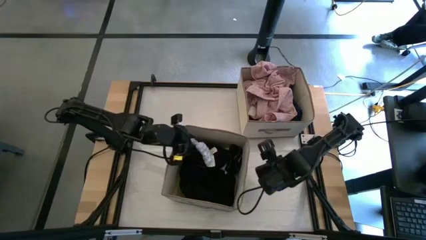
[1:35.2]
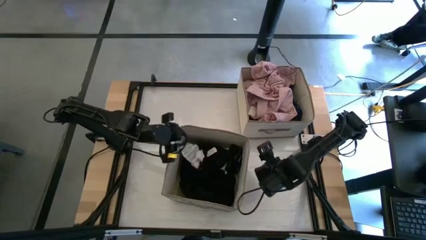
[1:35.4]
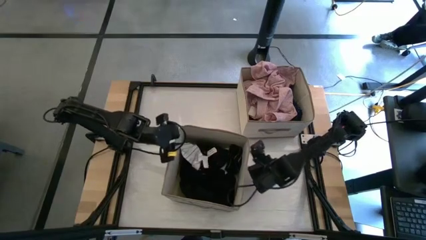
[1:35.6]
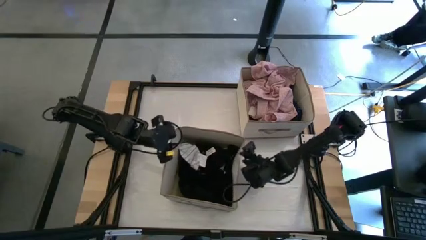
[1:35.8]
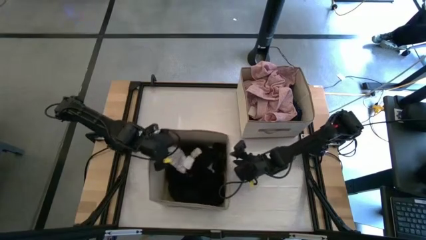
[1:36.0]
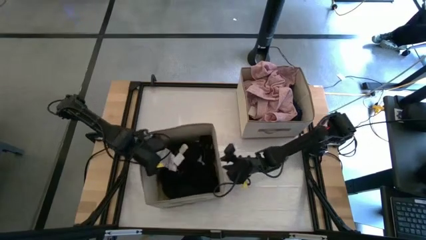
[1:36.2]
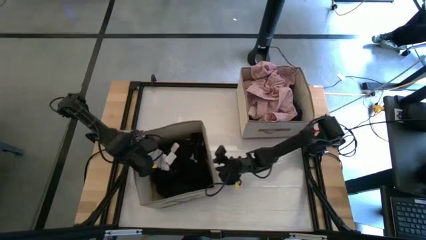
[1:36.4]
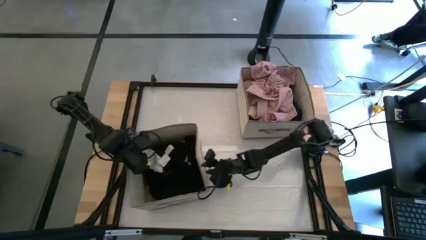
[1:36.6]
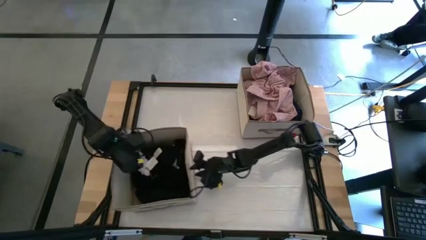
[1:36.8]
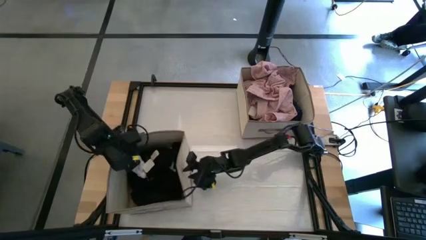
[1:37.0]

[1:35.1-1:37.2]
Task: Sort clothes
Adjust the laundry organizer

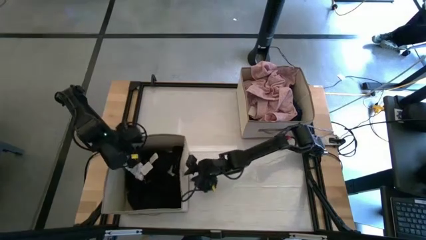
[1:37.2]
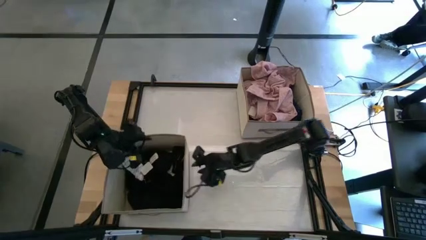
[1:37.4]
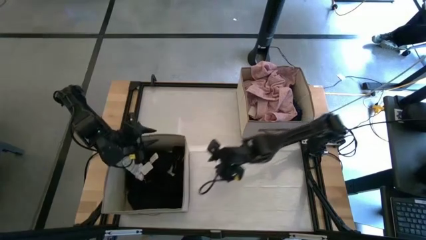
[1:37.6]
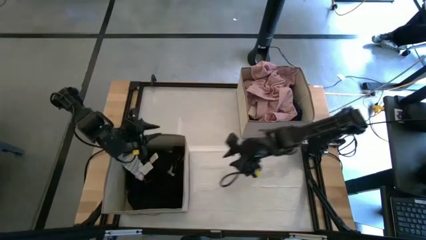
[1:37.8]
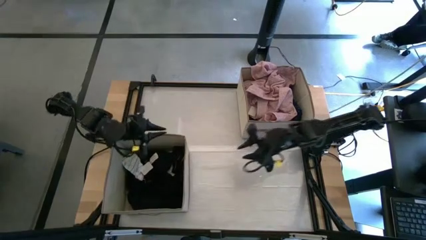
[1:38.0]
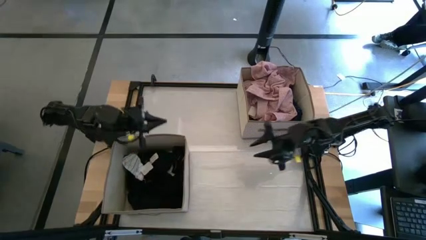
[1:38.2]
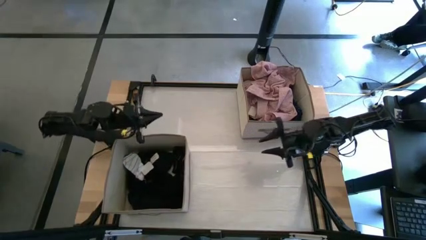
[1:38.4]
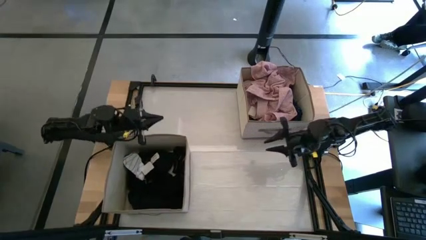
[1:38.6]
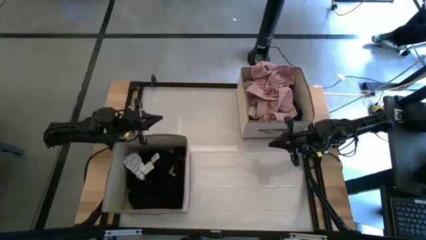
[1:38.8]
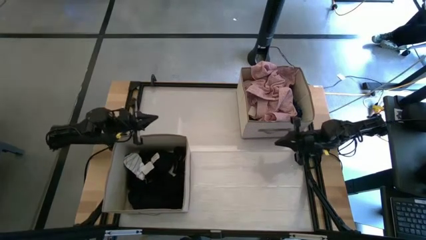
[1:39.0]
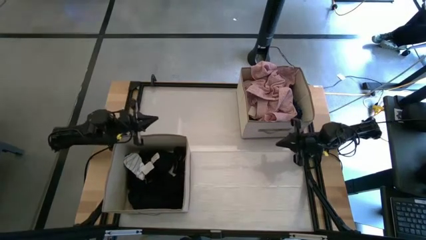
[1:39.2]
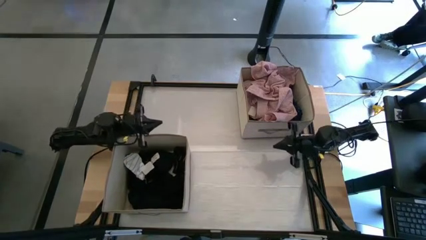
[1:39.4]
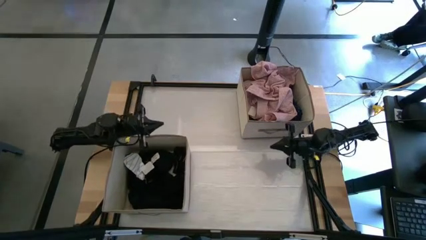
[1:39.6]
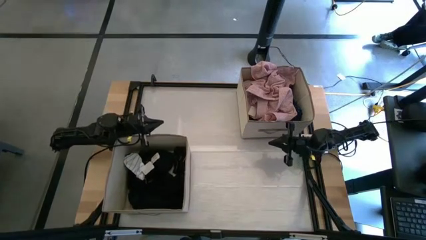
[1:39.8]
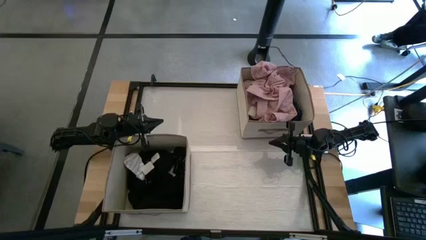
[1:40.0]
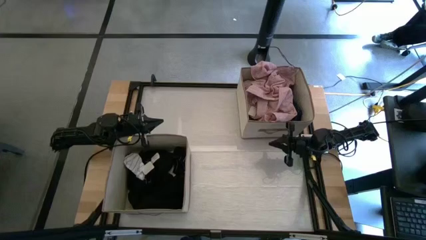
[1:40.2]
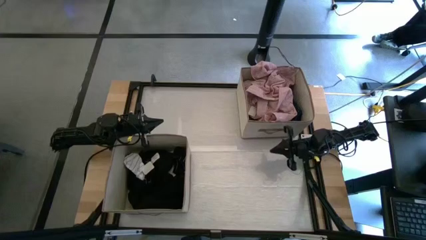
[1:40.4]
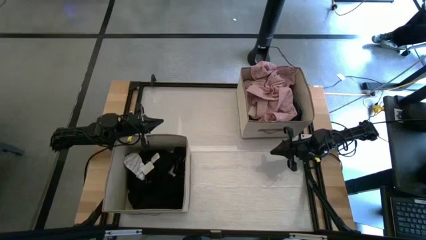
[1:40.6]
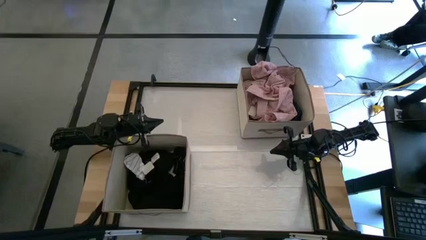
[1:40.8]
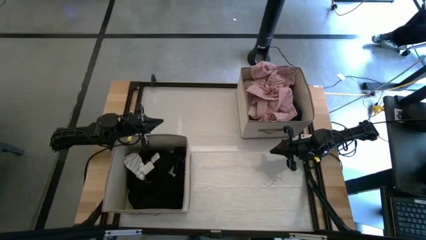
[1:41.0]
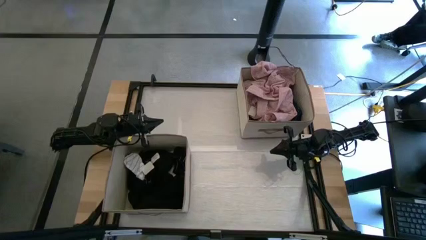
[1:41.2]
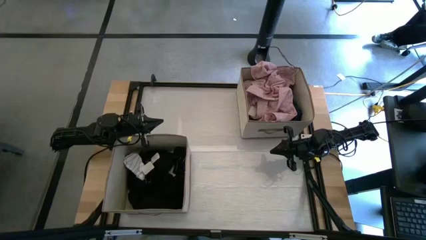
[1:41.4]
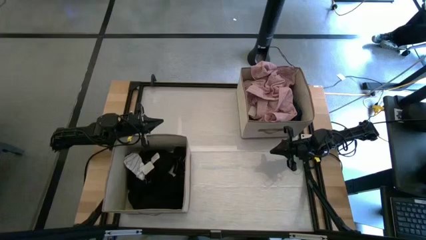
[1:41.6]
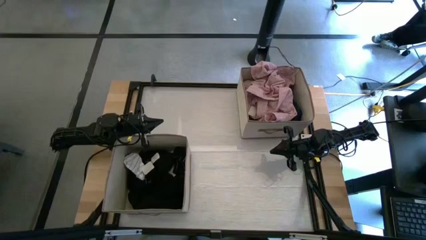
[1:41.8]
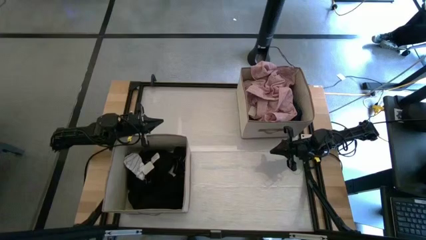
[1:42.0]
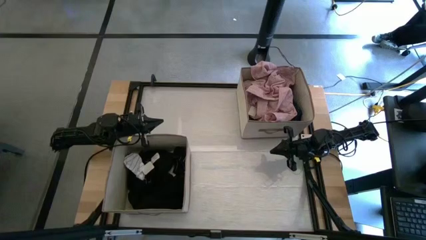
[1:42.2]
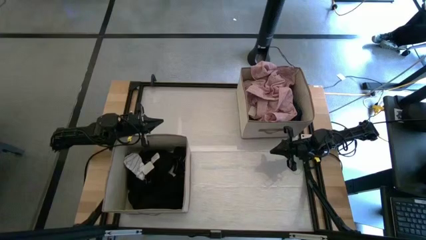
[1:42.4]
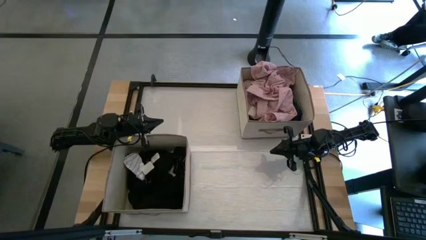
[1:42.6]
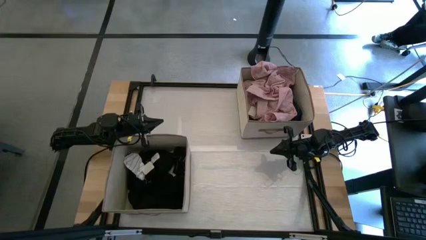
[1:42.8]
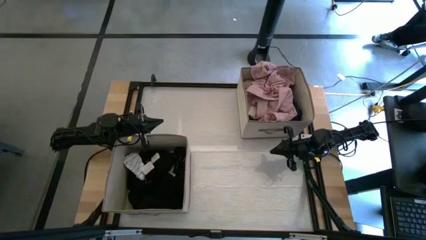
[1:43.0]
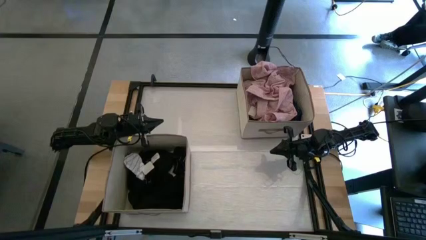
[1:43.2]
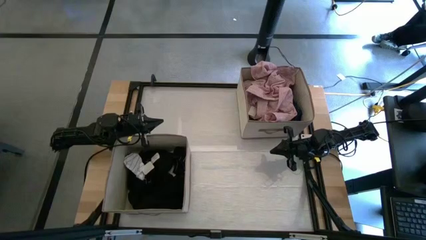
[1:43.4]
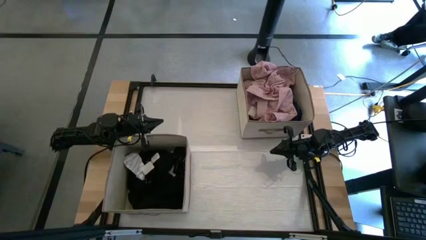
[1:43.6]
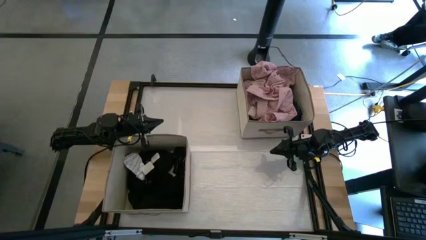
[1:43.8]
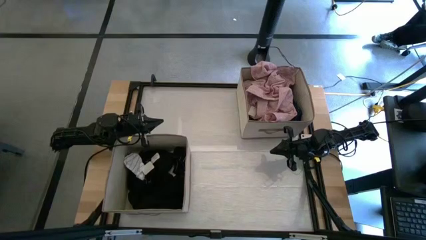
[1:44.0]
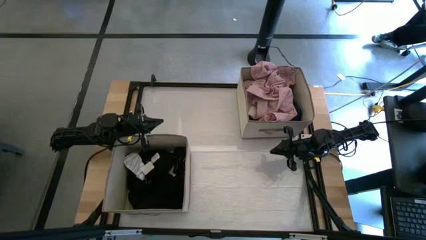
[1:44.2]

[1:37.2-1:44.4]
Return to Home Position

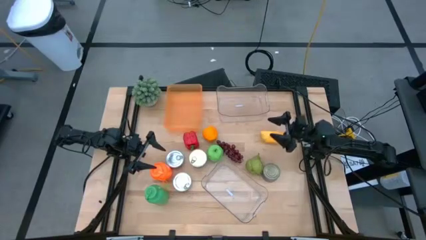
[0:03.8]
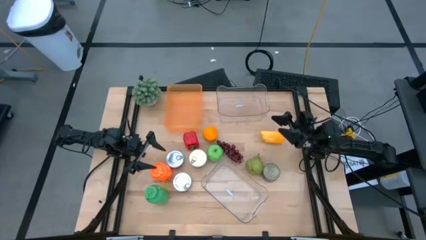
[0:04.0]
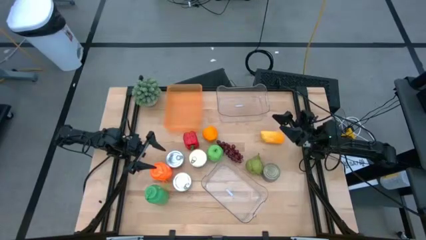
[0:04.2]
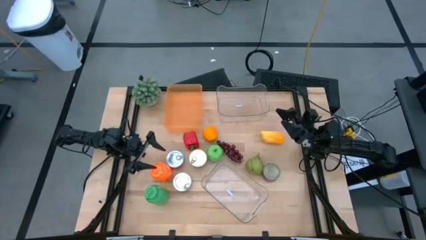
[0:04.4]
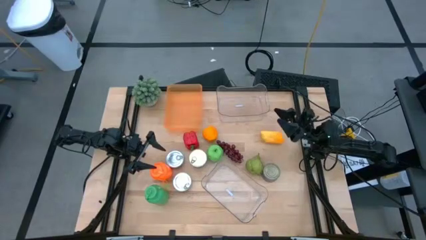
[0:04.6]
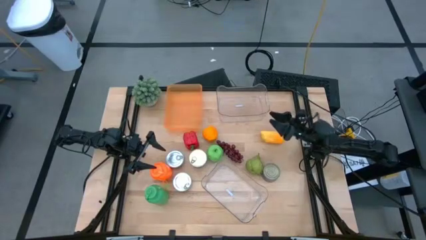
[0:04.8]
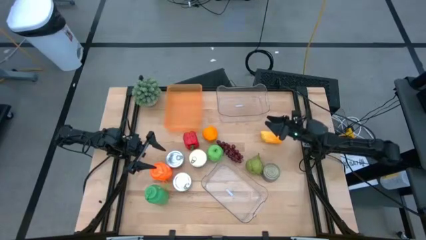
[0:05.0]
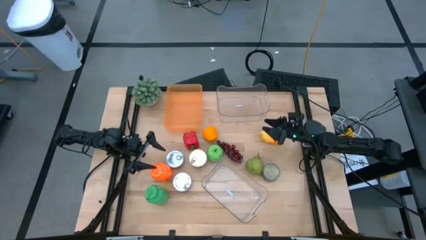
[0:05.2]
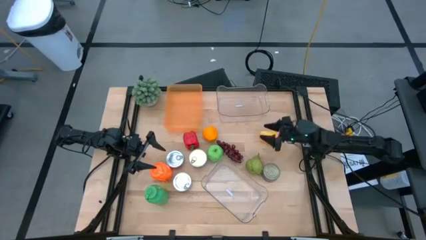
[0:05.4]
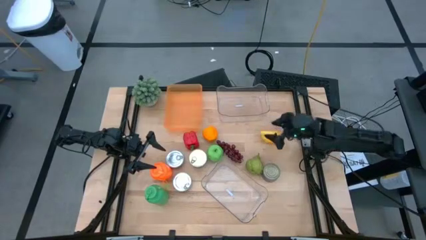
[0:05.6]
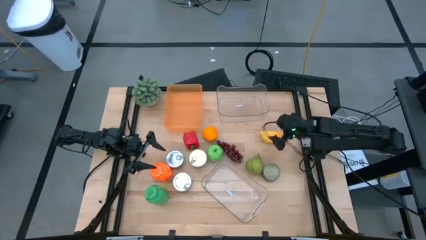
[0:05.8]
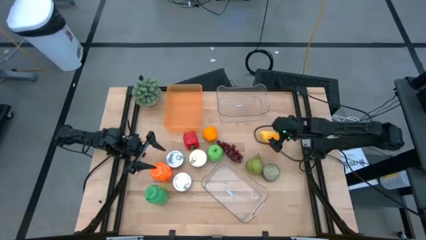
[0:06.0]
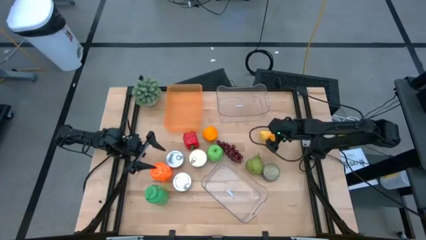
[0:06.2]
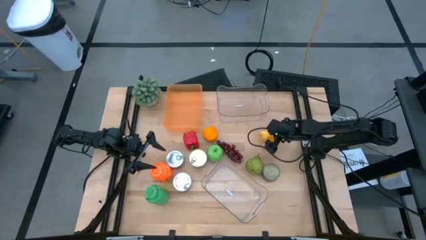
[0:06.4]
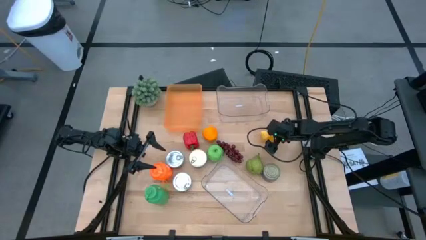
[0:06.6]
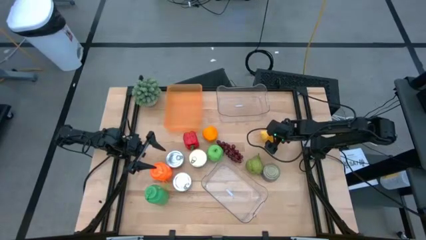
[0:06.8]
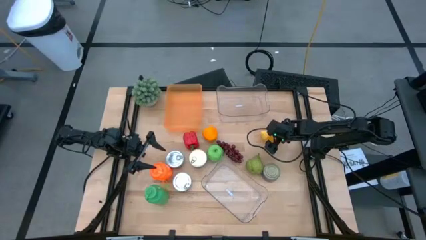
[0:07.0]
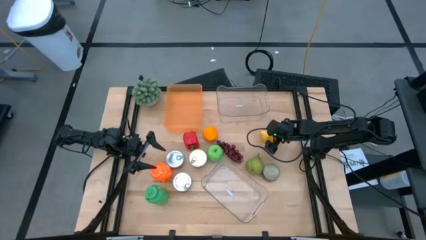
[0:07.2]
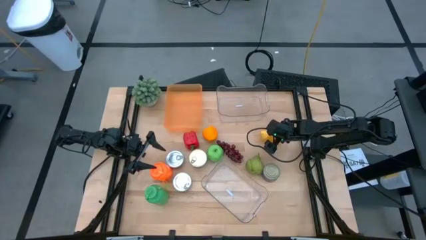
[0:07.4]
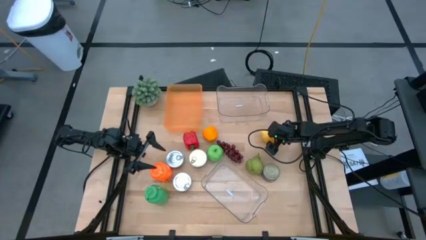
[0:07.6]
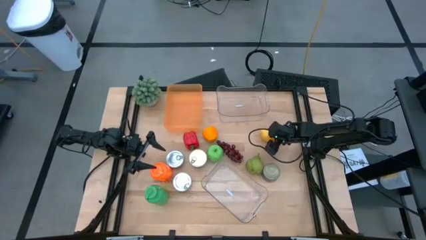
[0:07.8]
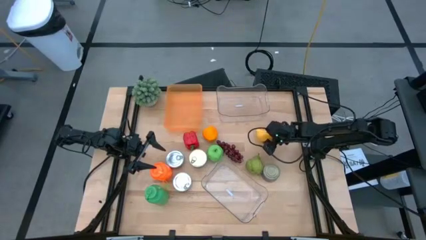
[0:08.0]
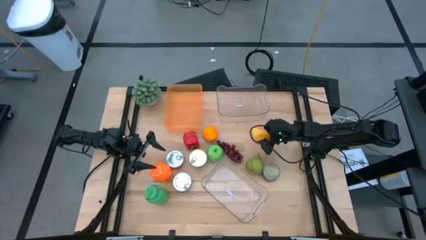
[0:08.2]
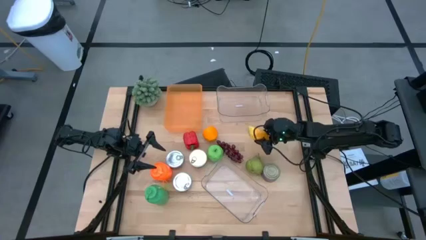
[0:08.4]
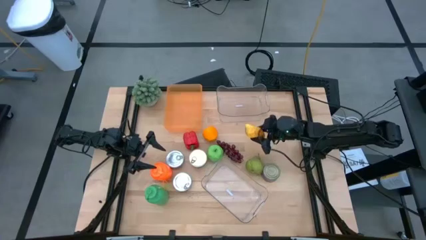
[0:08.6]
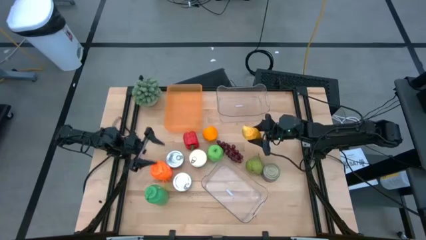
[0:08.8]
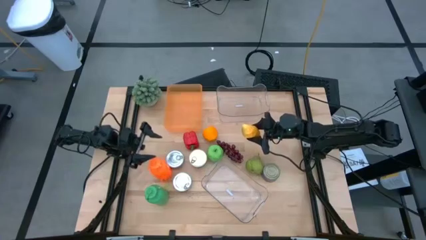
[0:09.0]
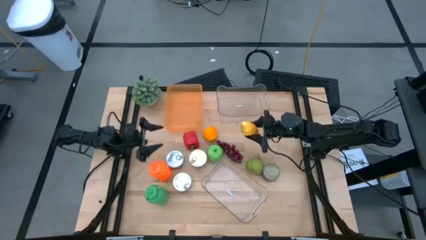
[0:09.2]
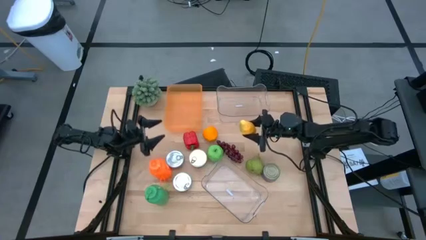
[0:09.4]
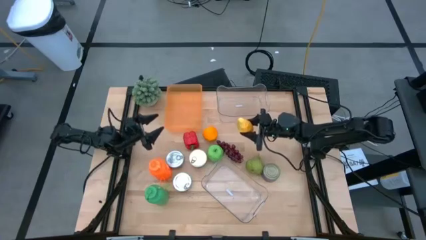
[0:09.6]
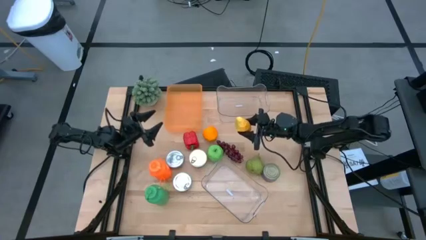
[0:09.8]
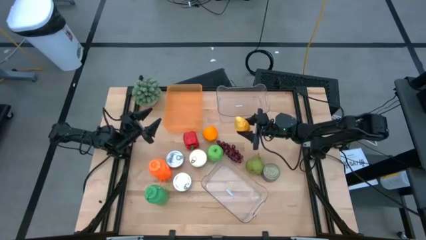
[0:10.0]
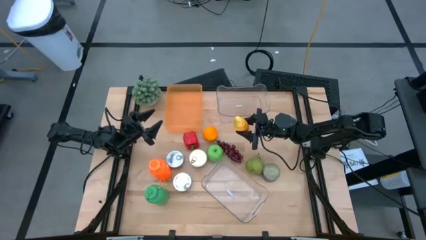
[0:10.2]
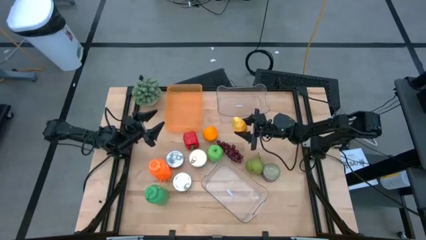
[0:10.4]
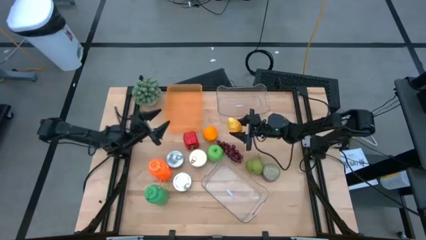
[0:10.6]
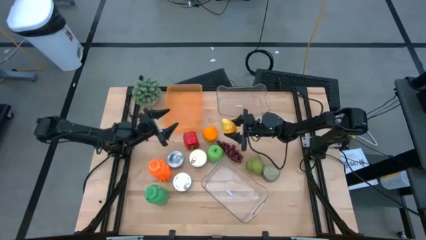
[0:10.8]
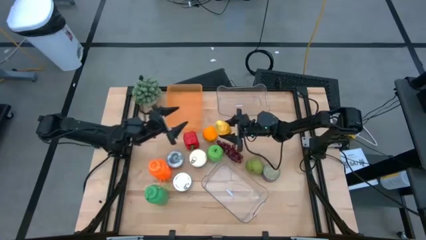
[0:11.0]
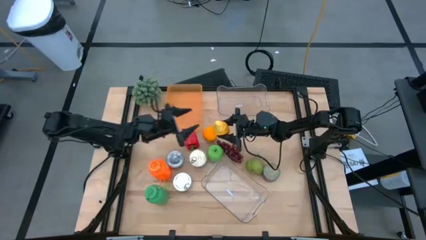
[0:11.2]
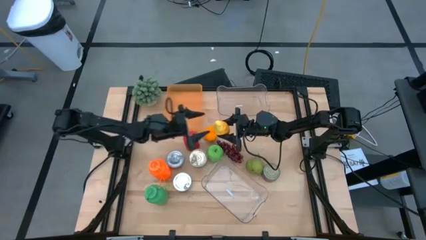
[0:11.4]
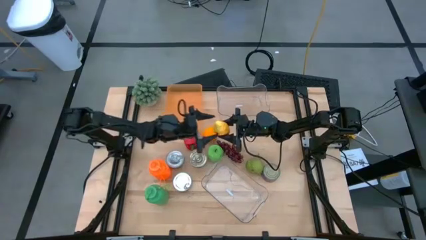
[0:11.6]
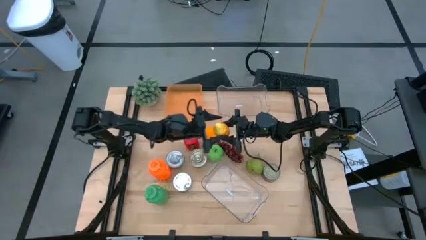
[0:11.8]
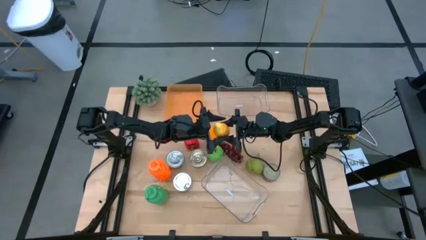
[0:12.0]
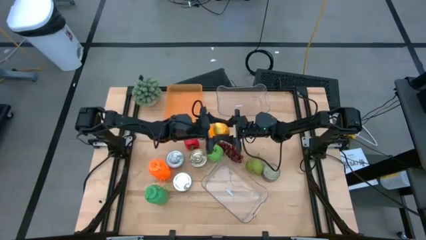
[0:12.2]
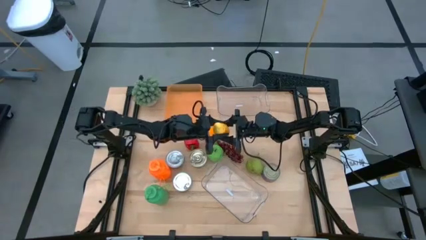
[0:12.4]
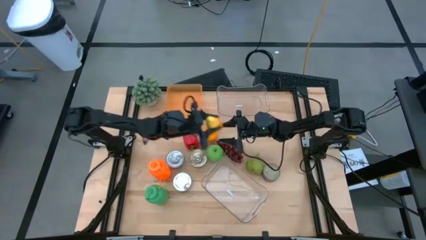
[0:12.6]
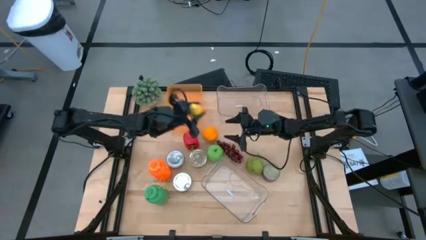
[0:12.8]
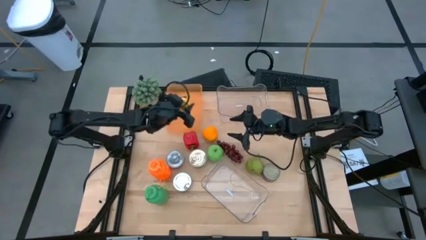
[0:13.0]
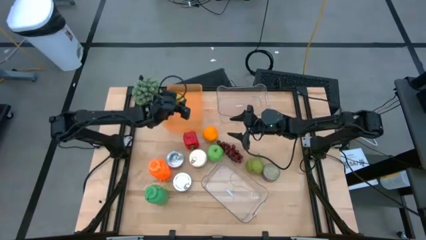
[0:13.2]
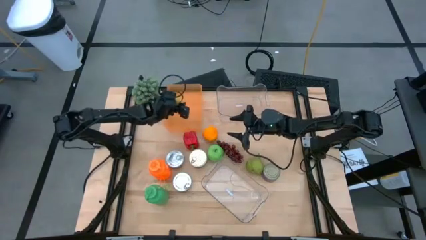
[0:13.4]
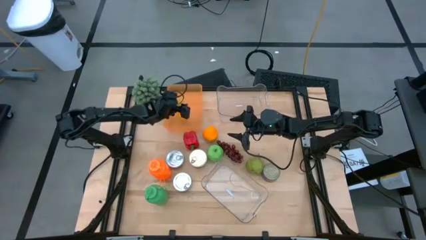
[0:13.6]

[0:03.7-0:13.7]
Task: Pick & Place Food Item
Put the mango into the orange bin
